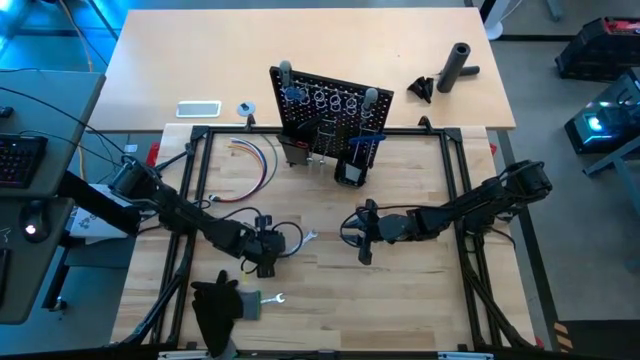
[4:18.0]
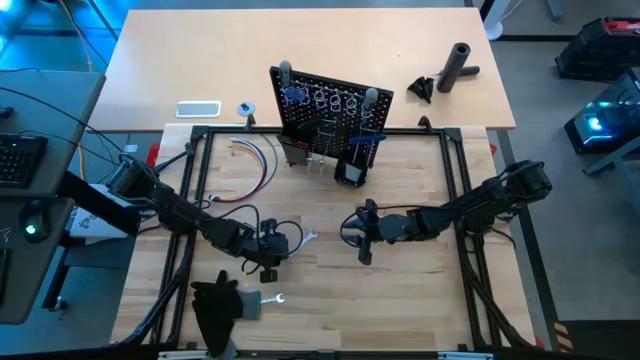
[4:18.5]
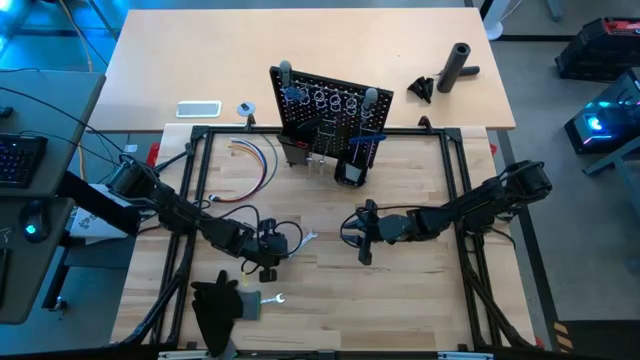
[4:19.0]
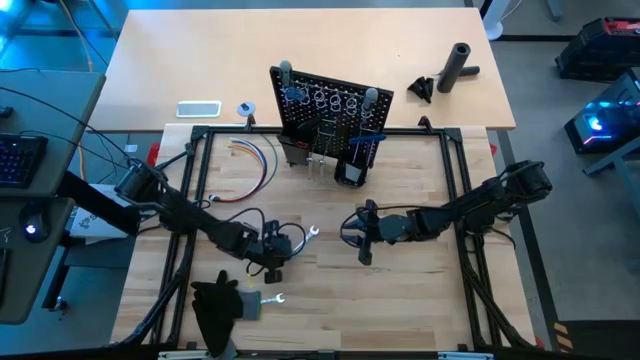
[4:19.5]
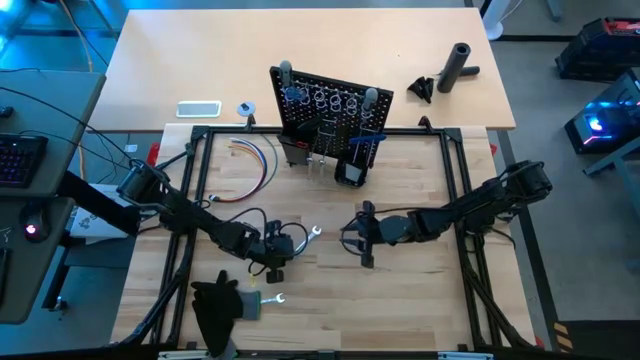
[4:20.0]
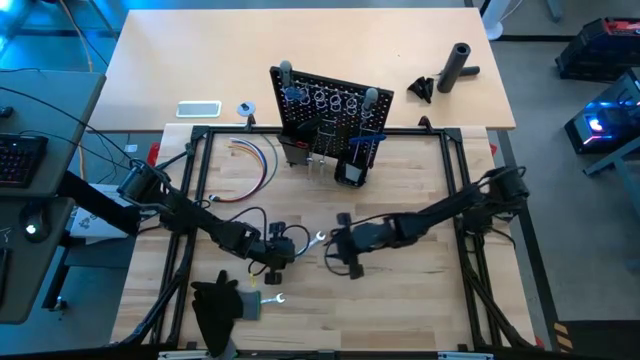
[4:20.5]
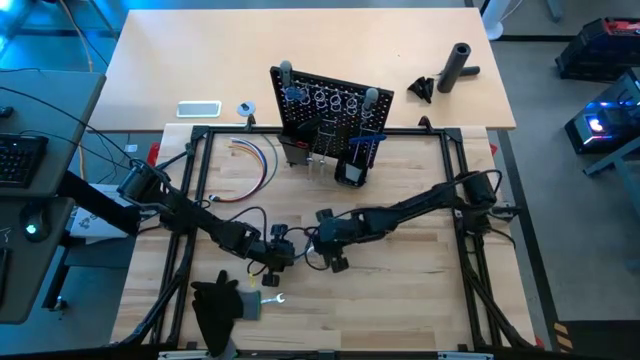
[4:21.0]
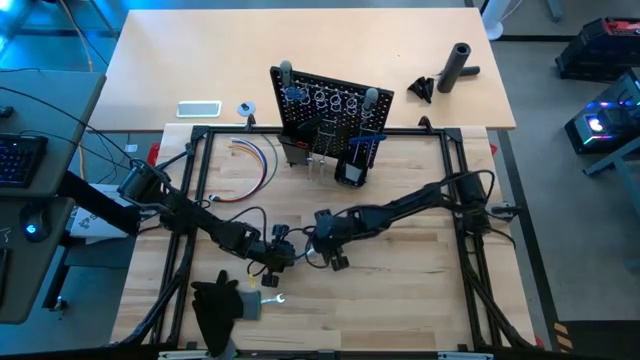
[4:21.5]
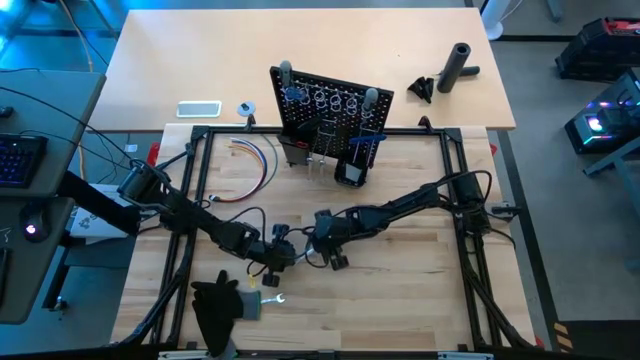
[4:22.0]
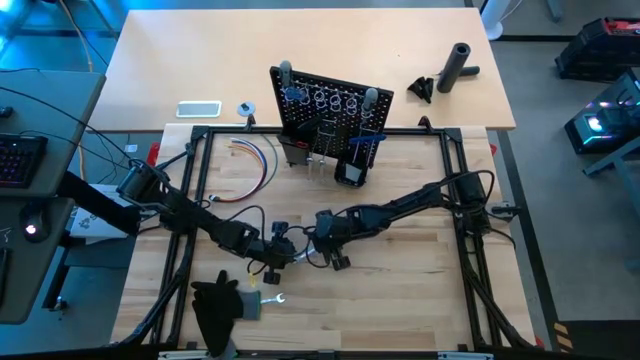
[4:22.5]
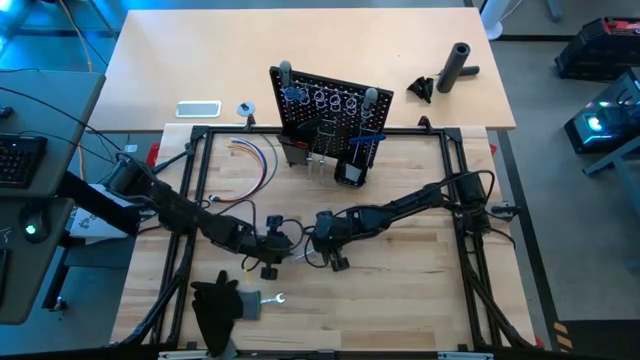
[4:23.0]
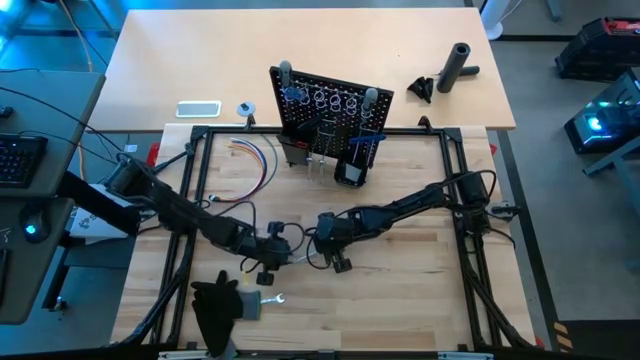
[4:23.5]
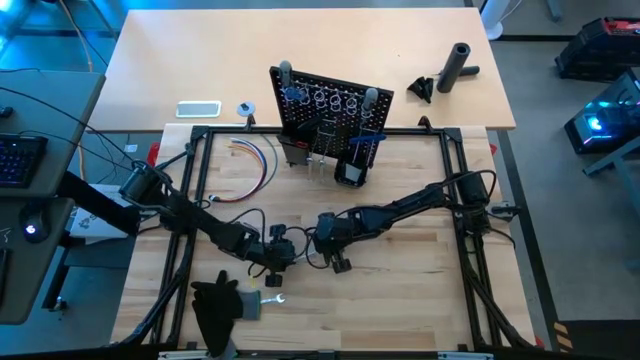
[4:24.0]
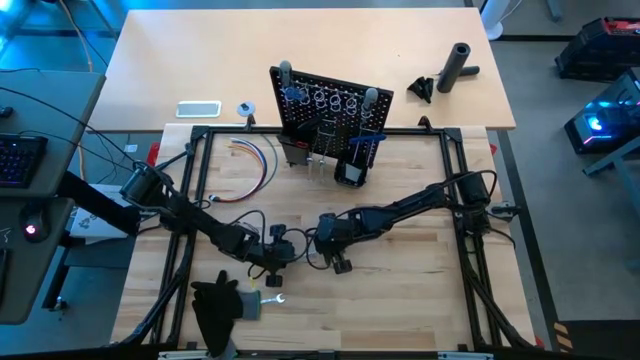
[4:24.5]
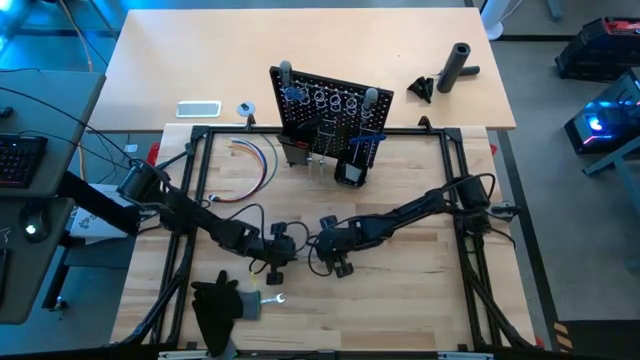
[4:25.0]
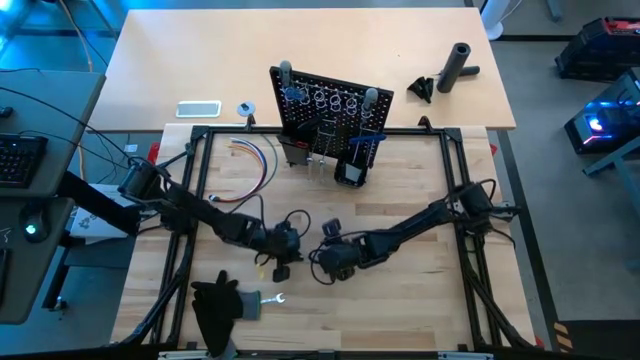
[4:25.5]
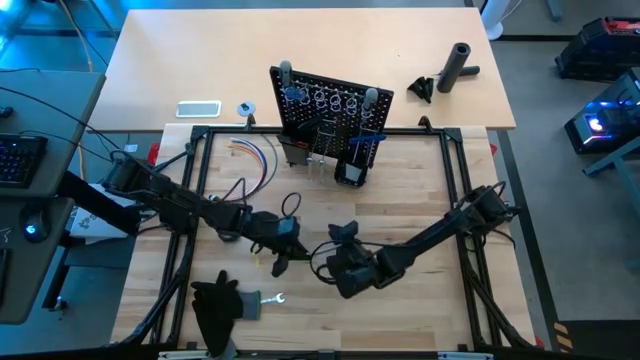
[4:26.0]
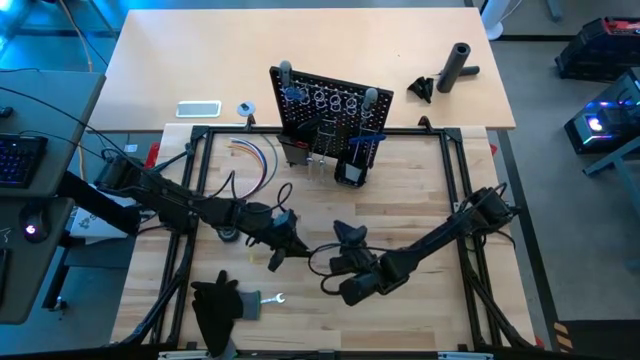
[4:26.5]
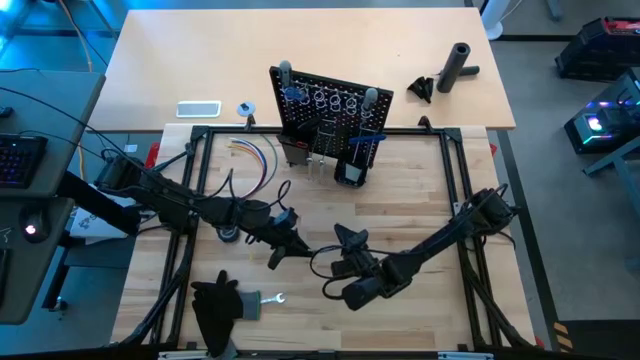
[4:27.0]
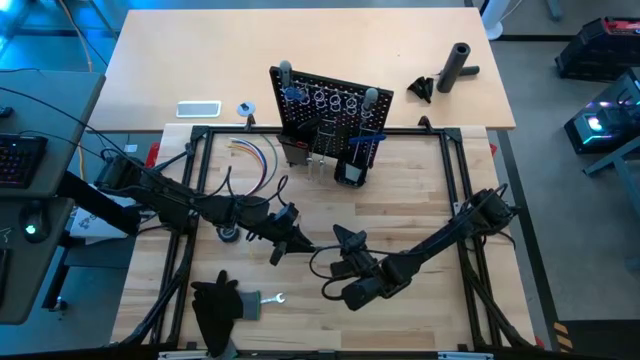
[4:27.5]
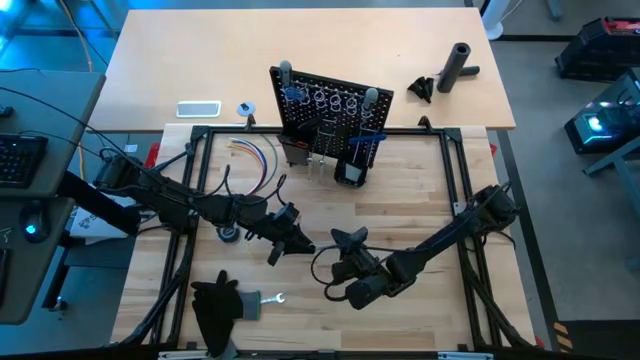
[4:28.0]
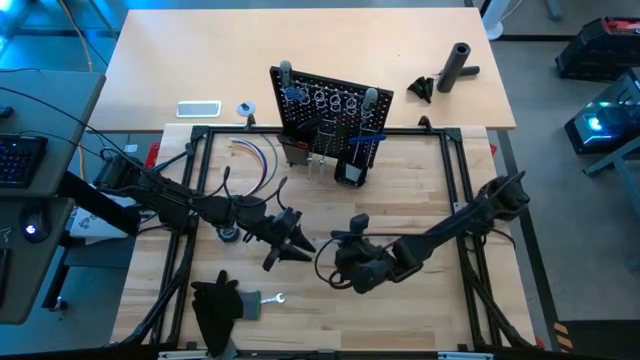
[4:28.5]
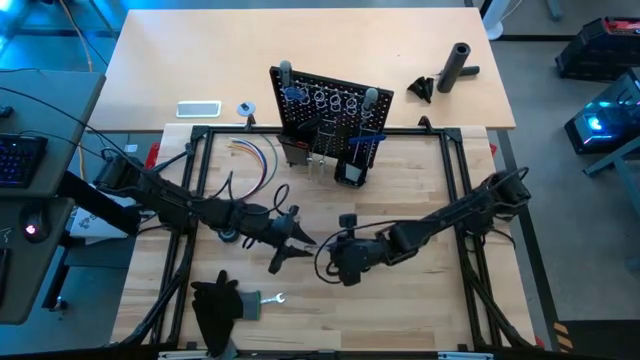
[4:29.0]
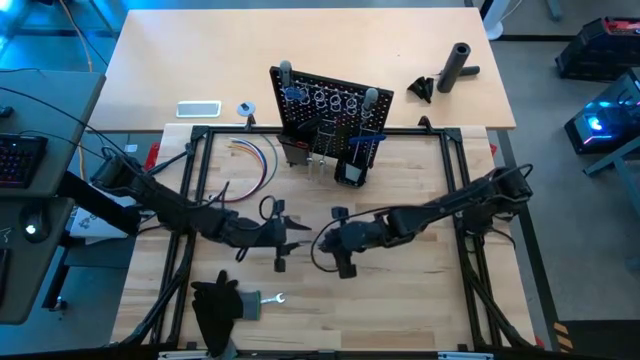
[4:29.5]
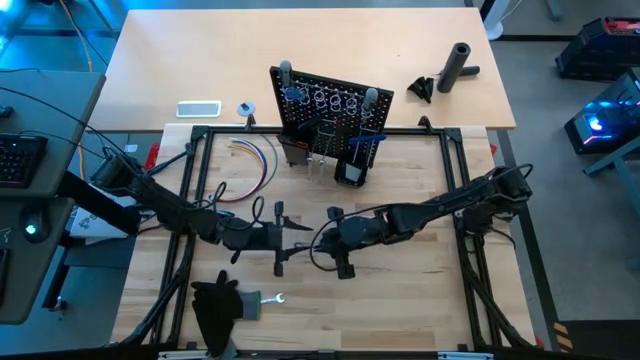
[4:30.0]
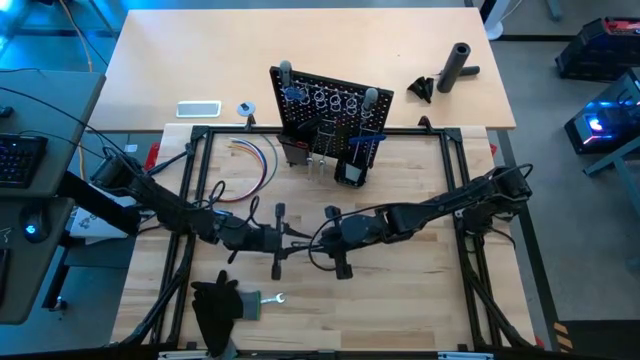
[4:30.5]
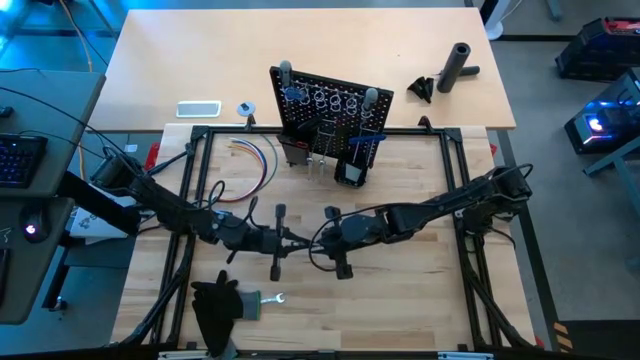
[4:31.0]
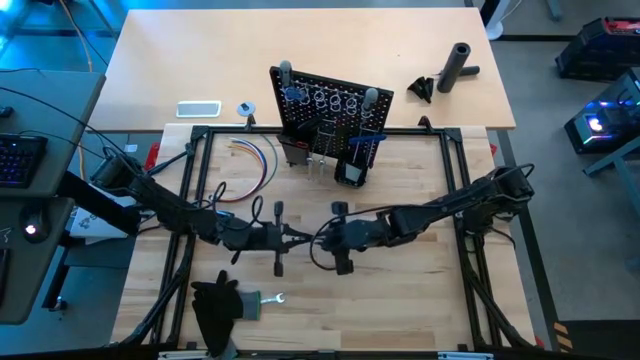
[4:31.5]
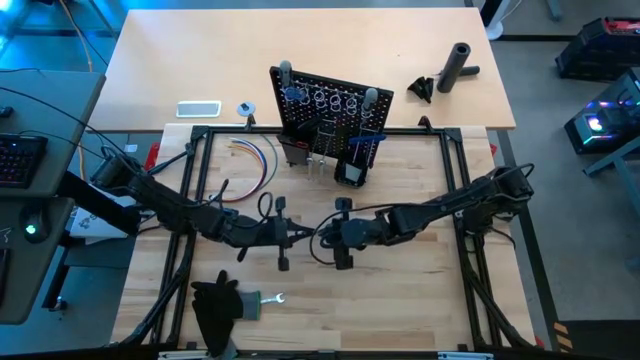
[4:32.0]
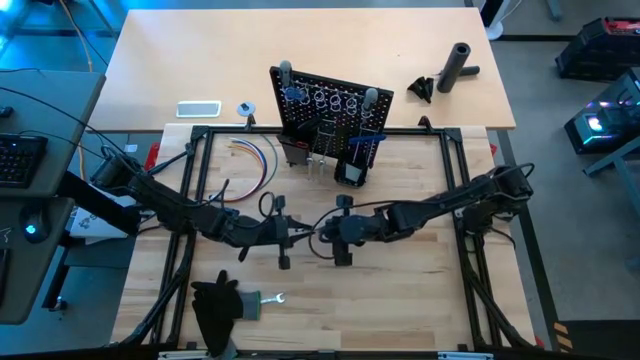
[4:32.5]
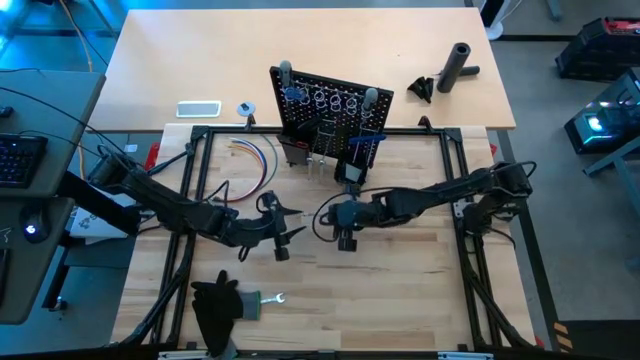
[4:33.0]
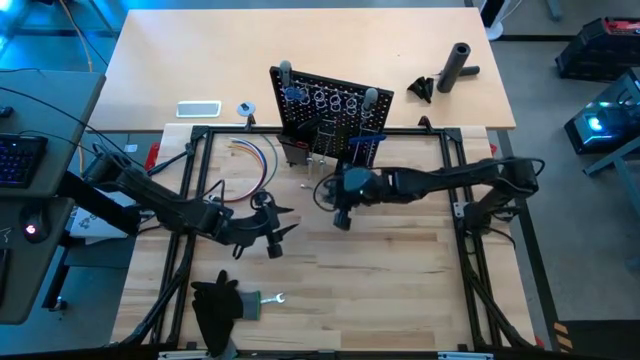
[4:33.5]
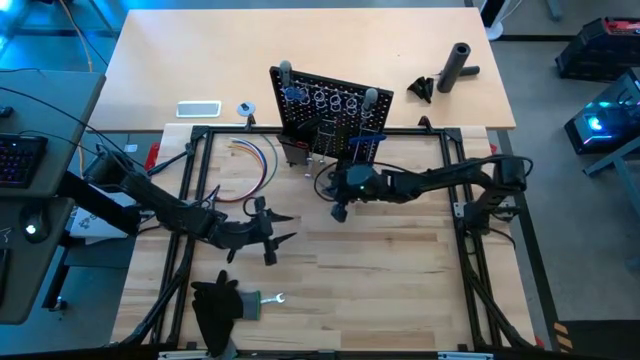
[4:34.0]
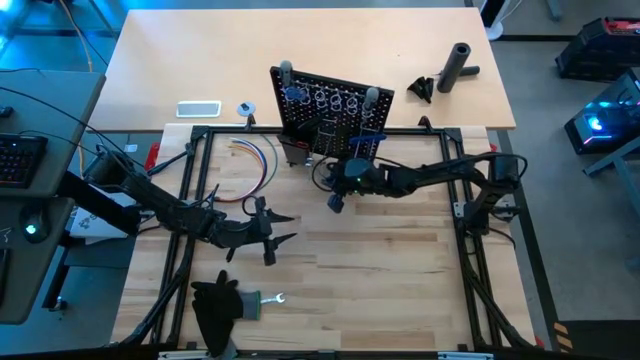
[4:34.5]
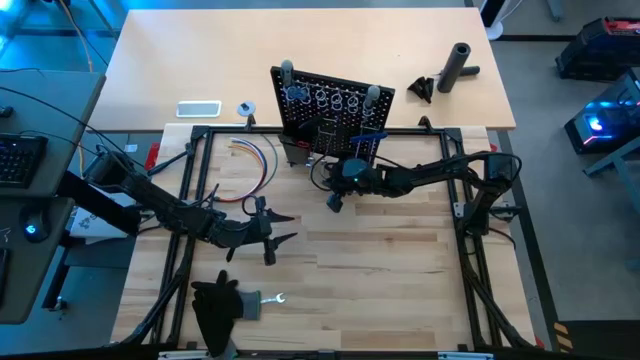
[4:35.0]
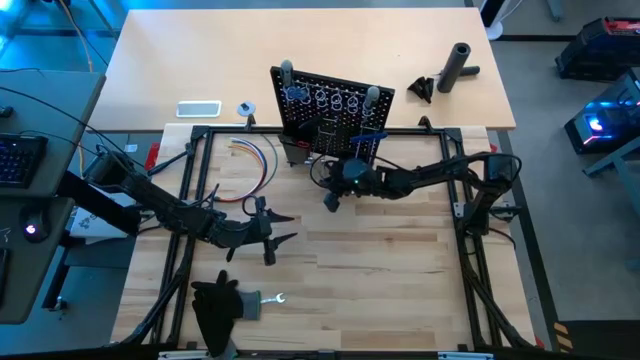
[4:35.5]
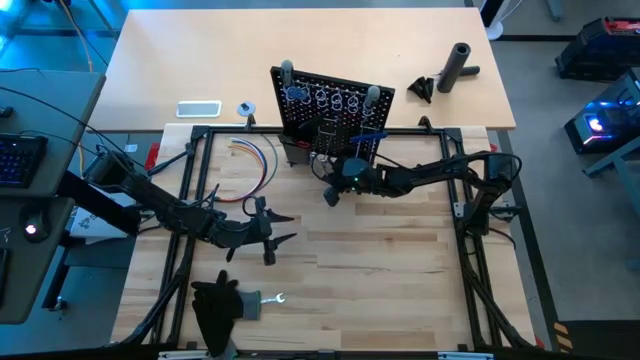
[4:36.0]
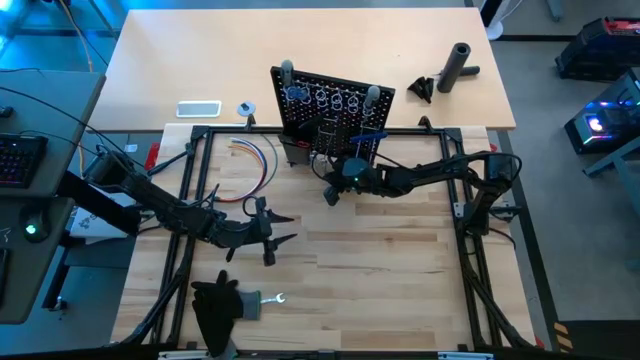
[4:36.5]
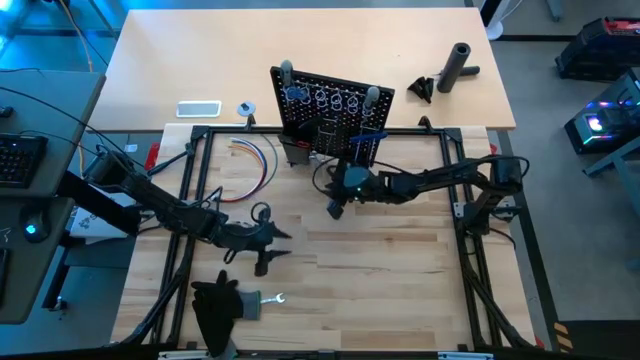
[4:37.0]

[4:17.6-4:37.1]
Task: Hang tools onto peg board
Hang the wrench on the black pegboard

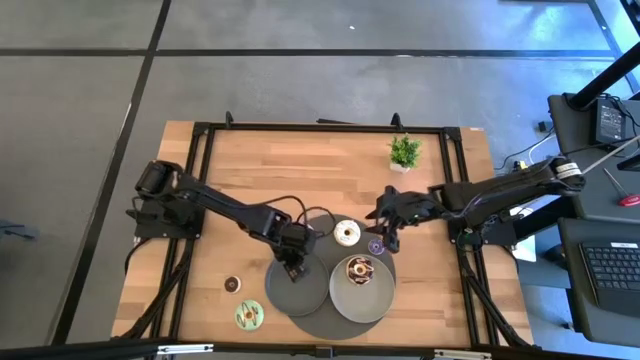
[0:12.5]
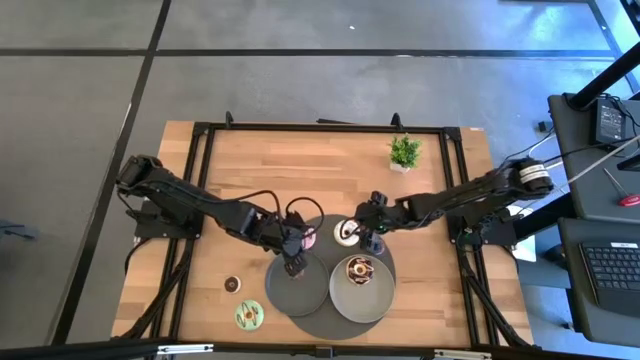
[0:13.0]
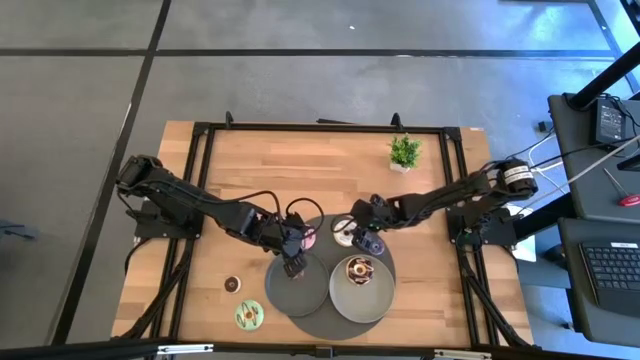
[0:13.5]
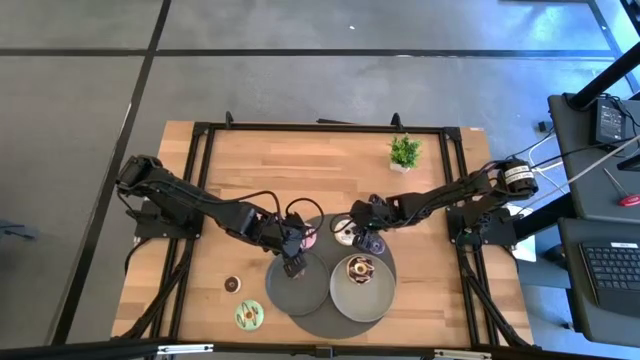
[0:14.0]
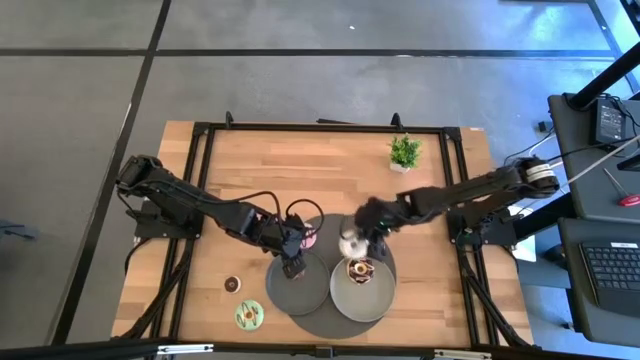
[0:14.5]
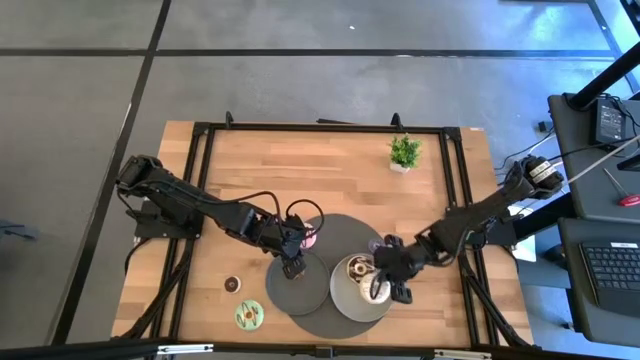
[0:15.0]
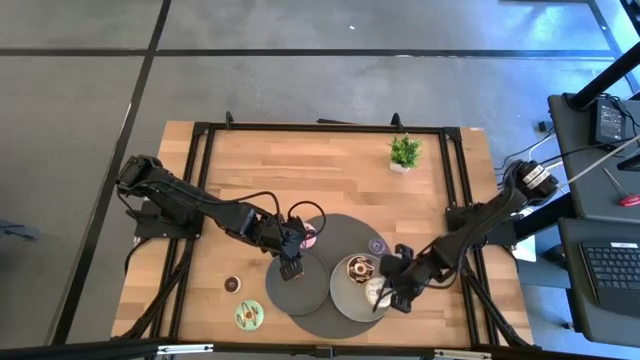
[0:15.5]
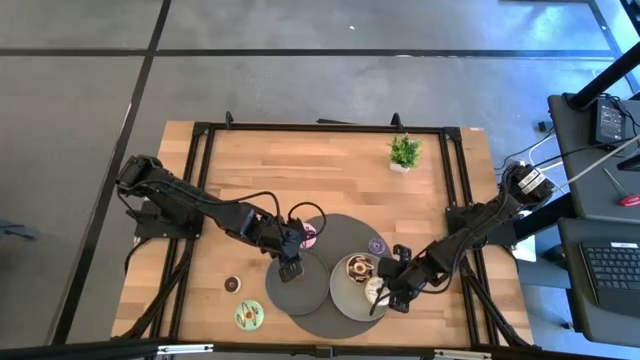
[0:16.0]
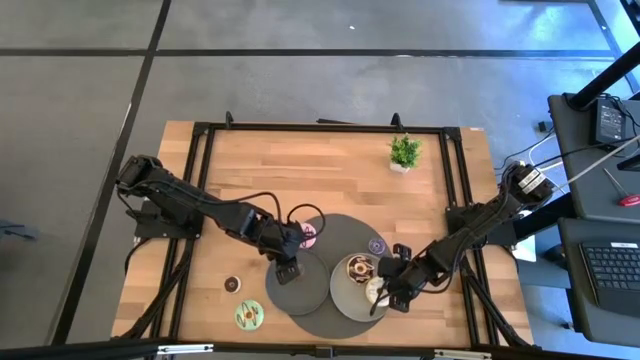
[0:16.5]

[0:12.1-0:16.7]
Task: Pick & Place donuts
Put the large white donut on the gray plate
